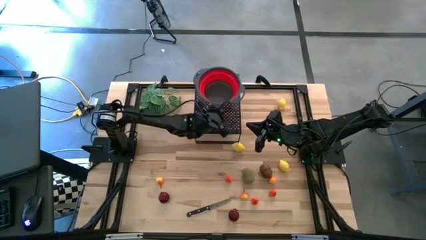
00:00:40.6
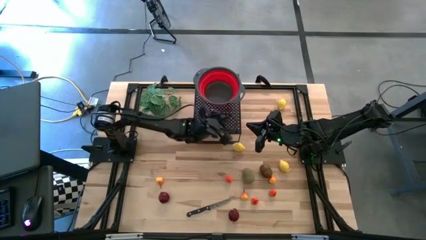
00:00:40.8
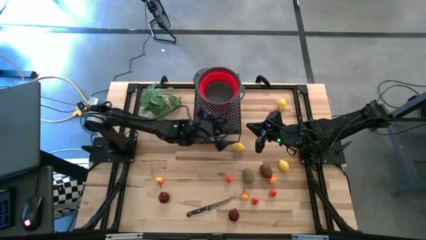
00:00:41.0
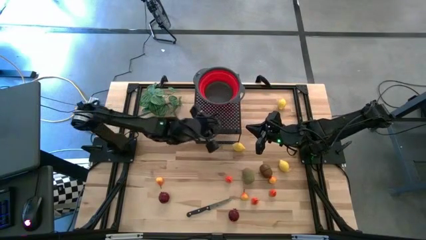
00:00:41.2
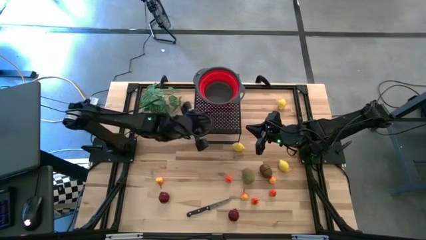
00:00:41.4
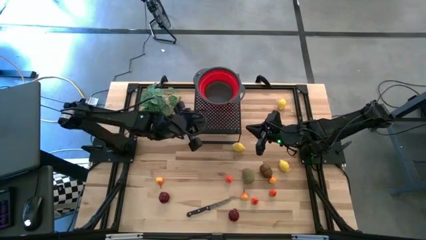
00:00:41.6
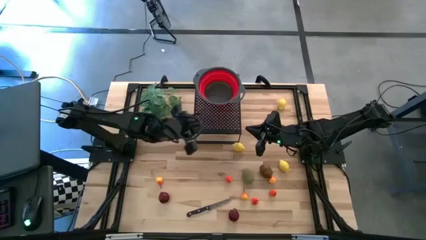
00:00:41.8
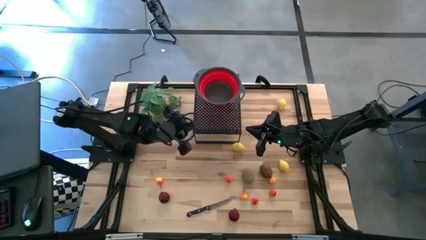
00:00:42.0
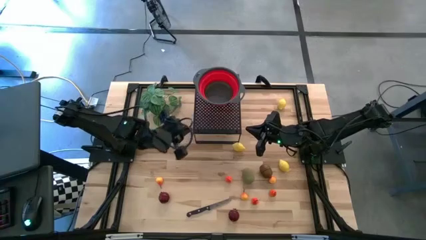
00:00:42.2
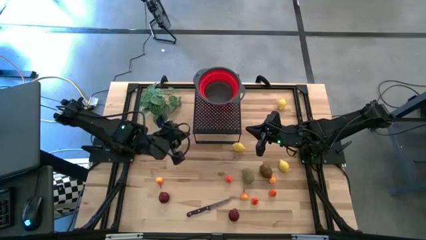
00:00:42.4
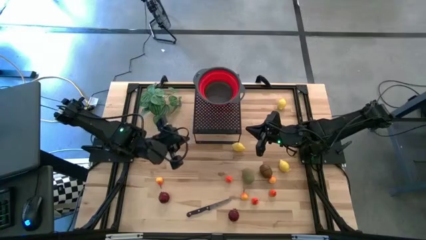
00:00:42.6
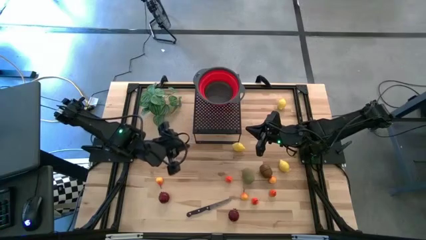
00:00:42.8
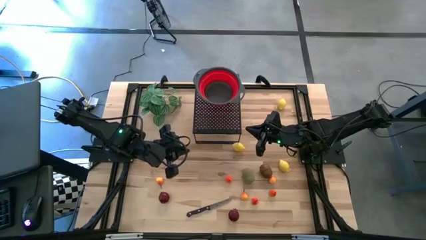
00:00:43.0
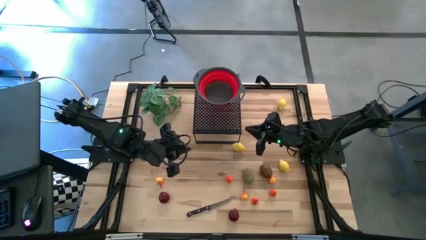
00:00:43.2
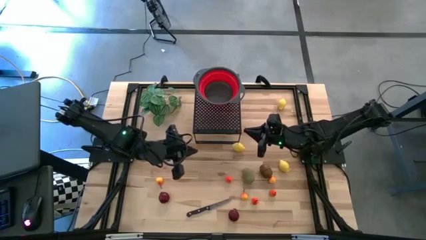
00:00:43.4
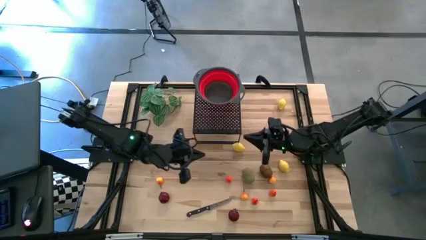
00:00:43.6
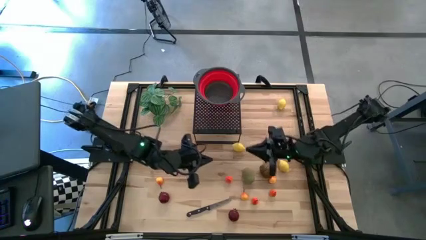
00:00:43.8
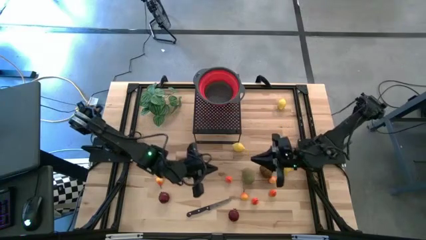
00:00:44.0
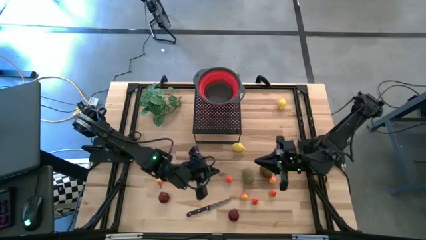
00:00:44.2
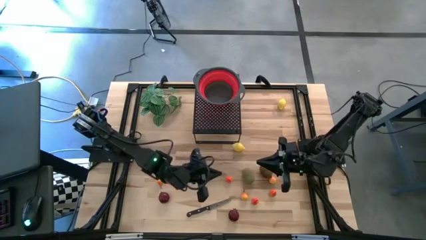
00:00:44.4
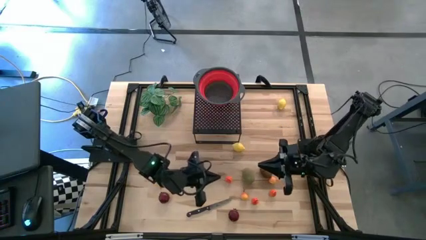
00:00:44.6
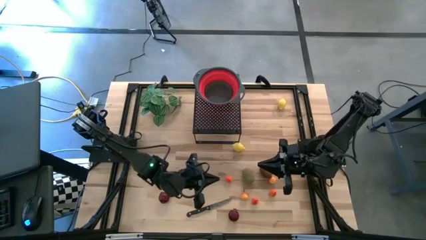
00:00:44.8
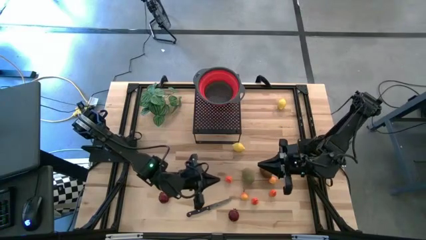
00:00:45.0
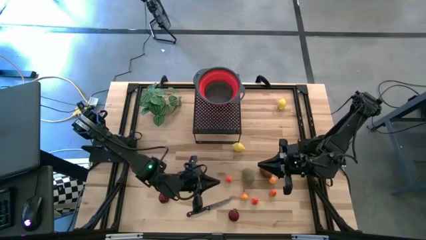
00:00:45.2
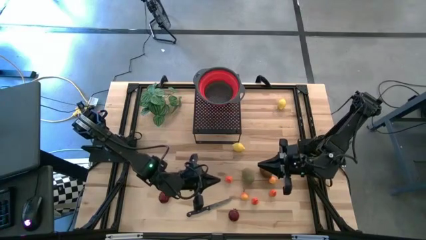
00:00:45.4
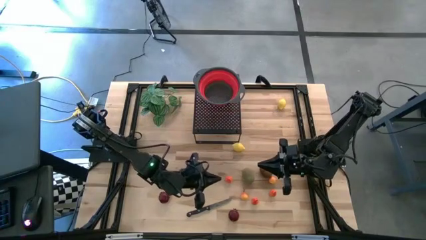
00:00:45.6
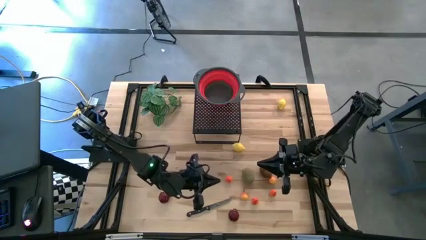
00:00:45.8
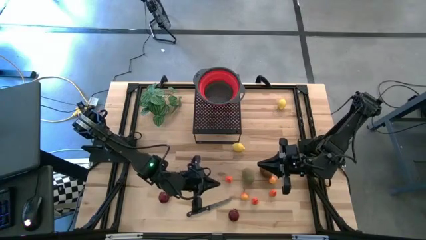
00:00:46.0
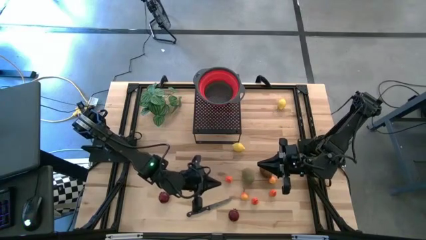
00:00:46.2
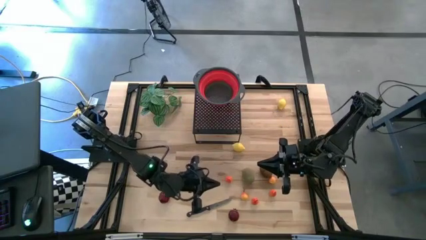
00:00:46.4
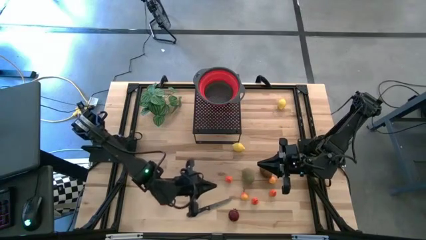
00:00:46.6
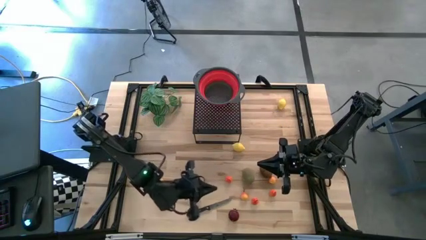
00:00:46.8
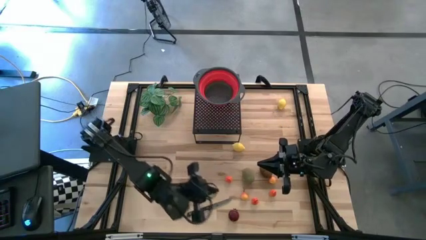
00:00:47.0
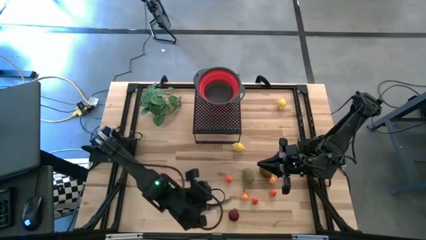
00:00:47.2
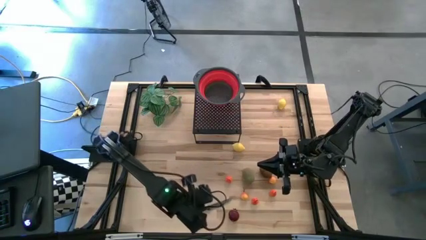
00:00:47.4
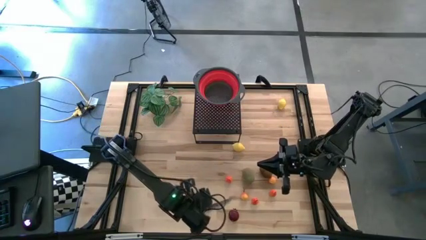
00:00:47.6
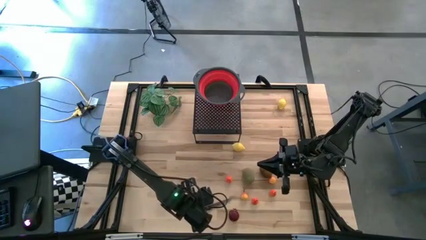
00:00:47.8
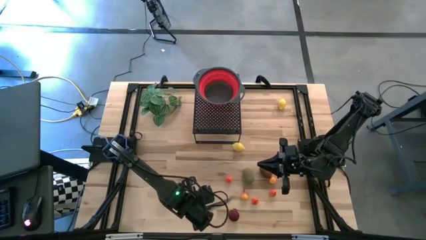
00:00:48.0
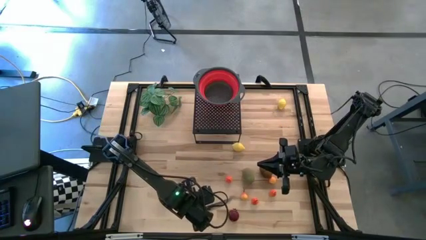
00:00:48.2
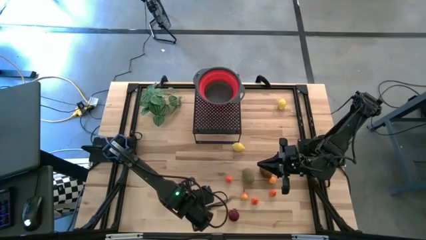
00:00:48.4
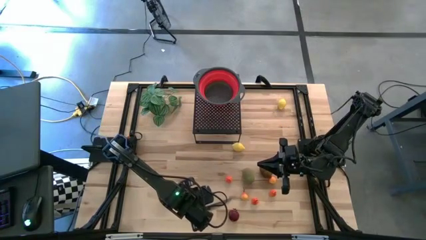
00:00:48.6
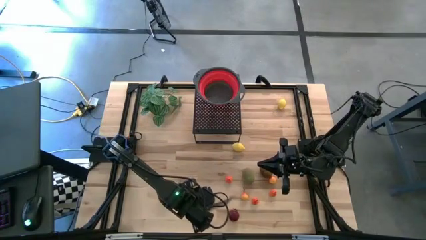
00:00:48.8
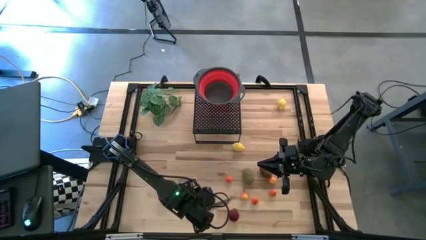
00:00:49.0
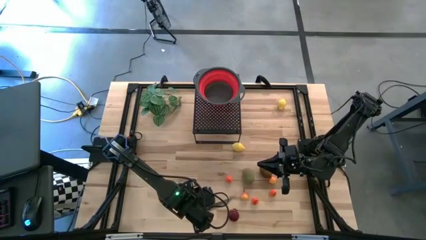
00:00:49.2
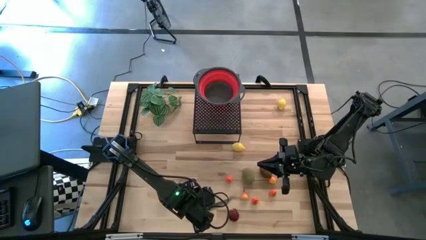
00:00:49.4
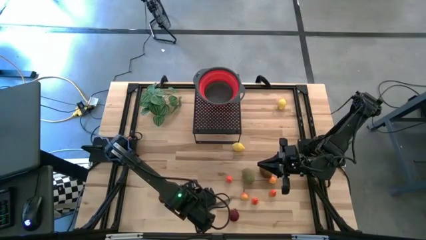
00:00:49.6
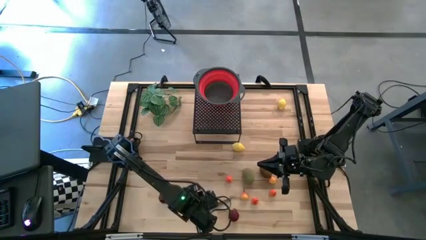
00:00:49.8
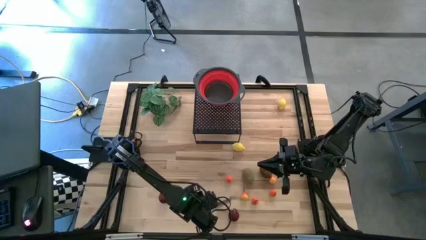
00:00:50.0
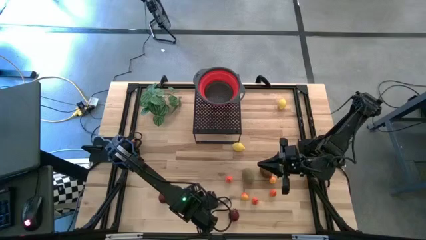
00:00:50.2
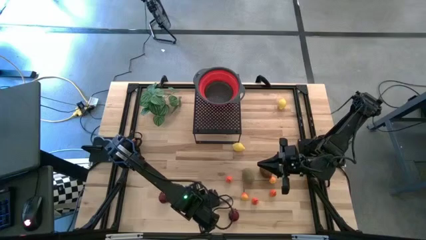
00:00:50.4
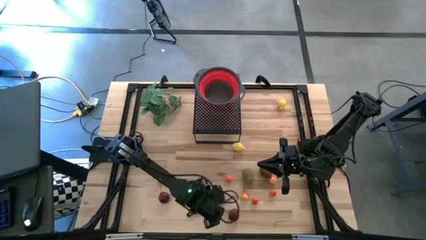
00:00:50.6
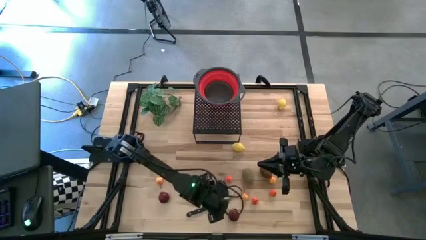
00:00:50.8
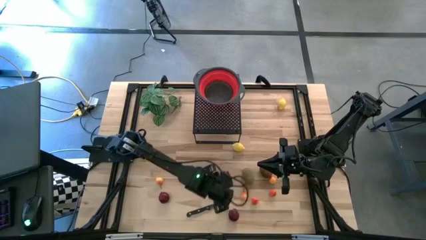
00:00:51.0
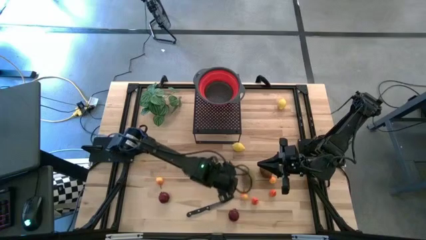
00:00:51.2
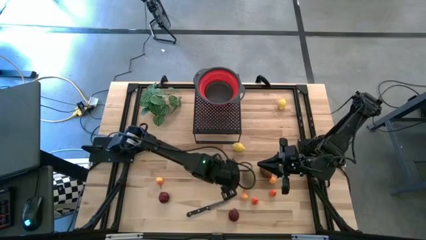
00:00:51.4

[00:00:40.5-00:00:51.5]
Task: Pick & Place Fruit
Put the pear into the red strainer bowl
